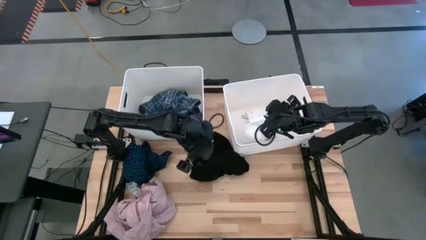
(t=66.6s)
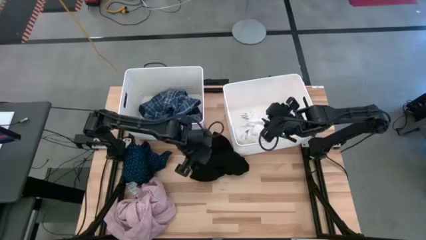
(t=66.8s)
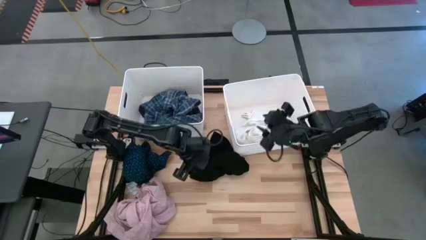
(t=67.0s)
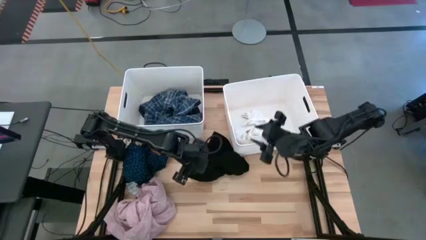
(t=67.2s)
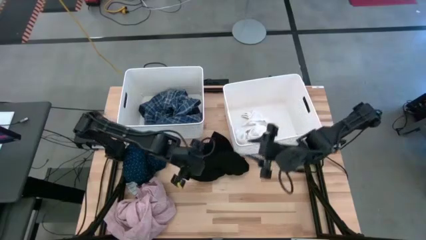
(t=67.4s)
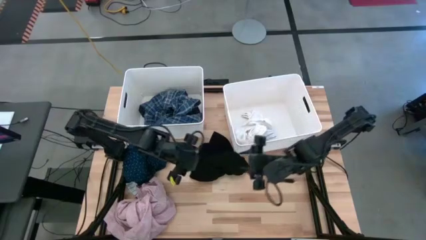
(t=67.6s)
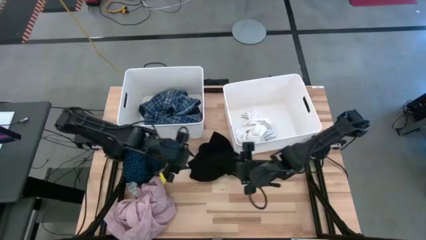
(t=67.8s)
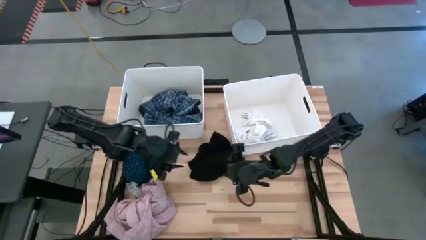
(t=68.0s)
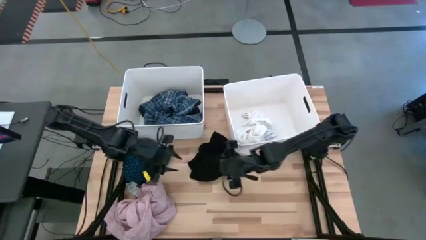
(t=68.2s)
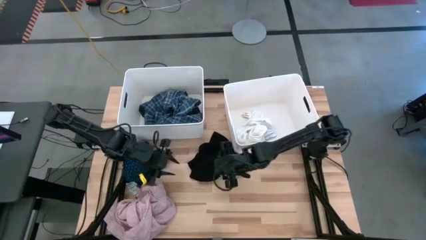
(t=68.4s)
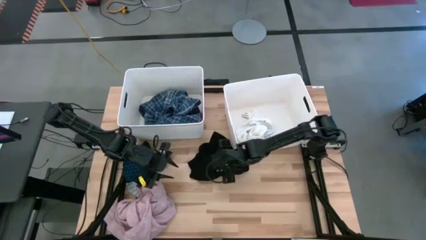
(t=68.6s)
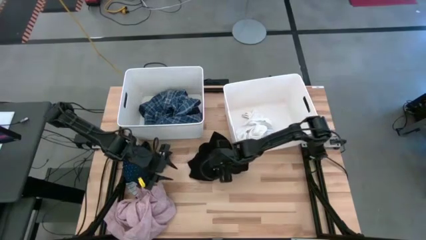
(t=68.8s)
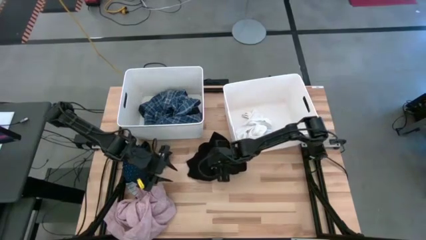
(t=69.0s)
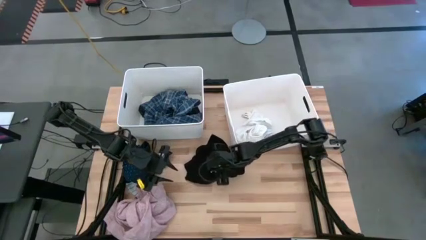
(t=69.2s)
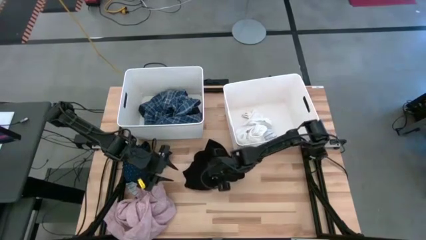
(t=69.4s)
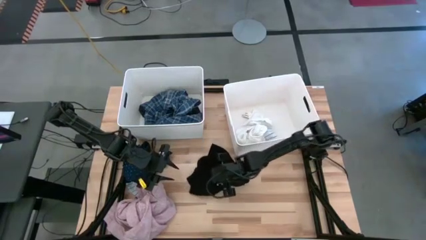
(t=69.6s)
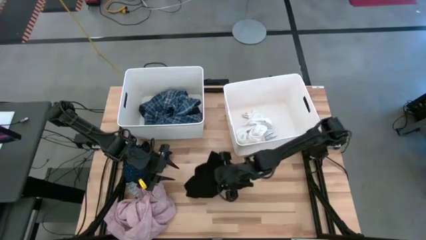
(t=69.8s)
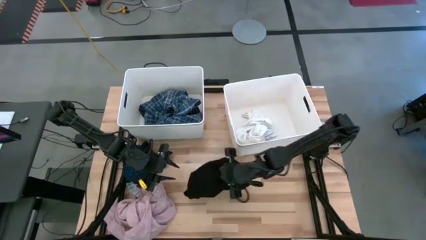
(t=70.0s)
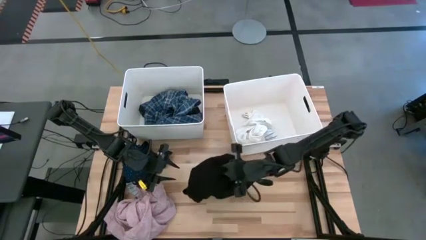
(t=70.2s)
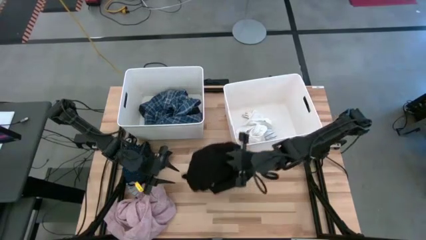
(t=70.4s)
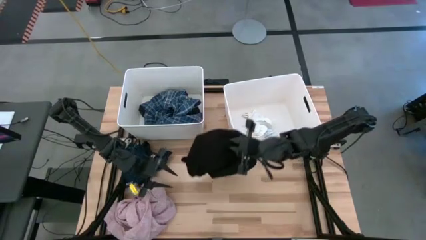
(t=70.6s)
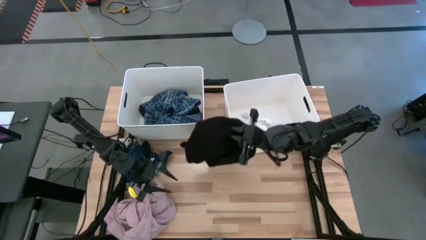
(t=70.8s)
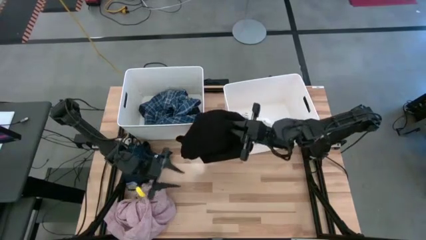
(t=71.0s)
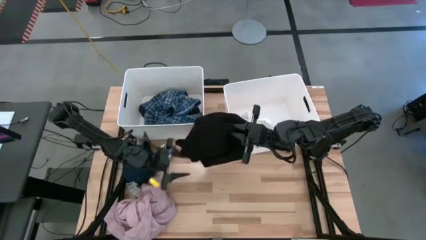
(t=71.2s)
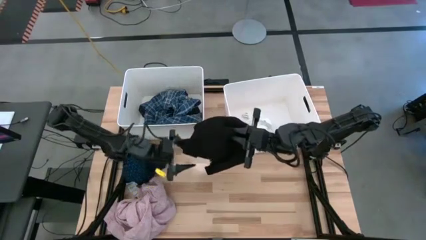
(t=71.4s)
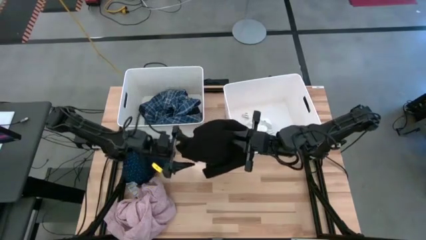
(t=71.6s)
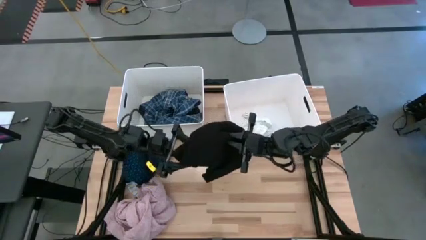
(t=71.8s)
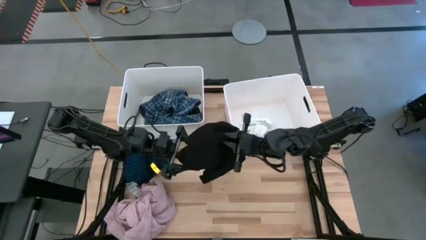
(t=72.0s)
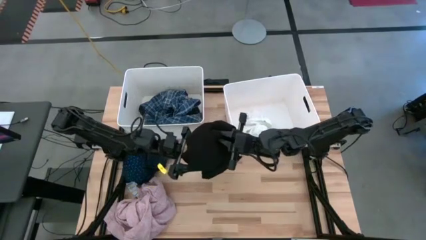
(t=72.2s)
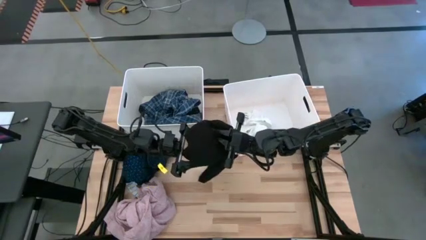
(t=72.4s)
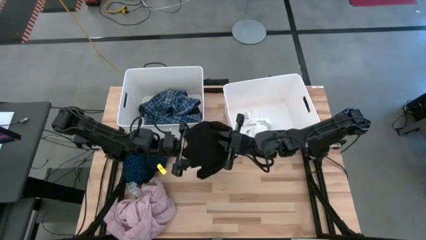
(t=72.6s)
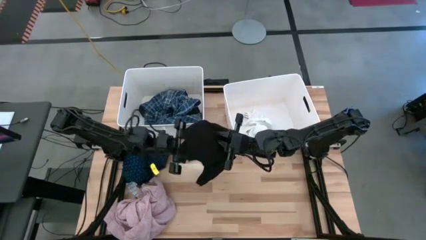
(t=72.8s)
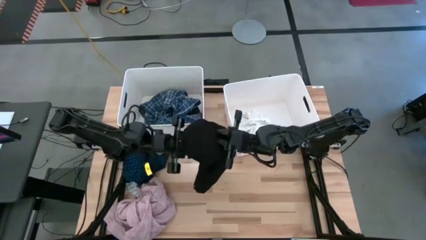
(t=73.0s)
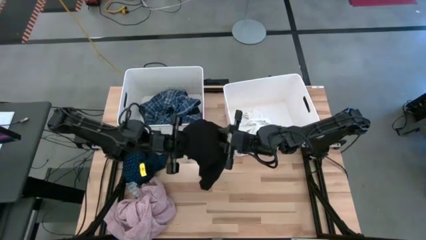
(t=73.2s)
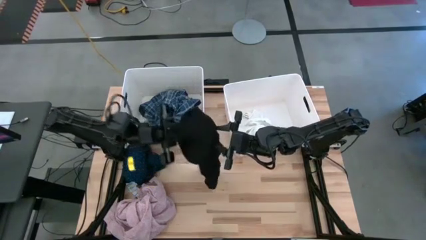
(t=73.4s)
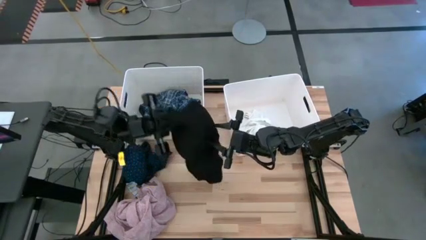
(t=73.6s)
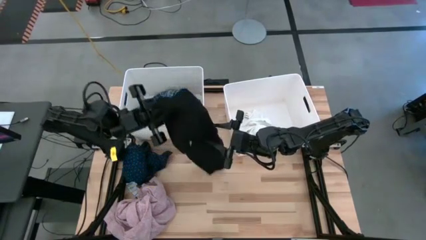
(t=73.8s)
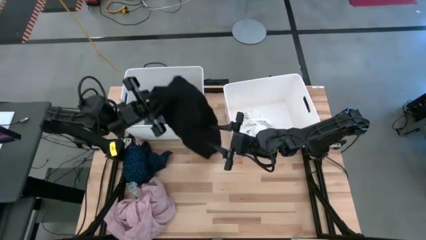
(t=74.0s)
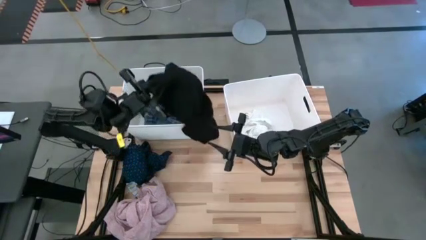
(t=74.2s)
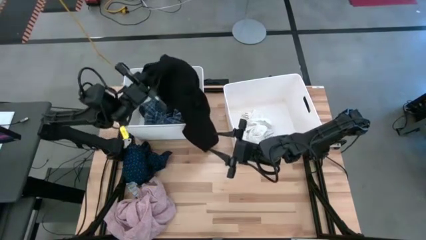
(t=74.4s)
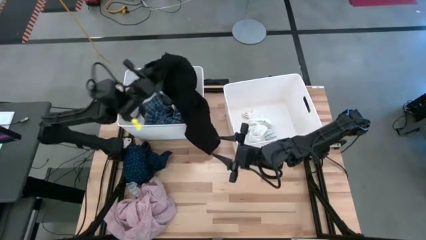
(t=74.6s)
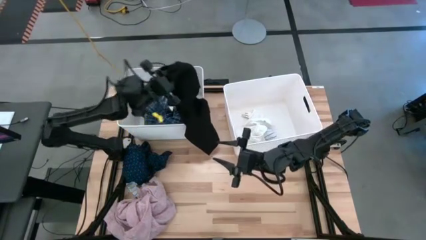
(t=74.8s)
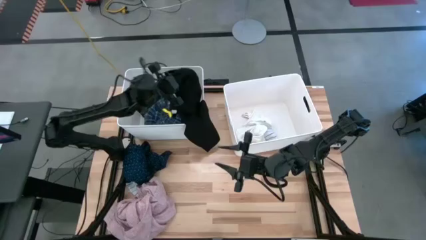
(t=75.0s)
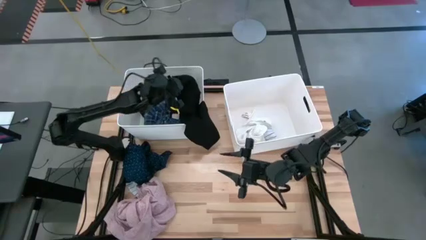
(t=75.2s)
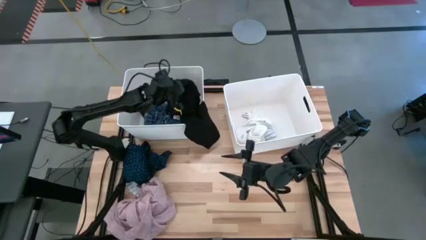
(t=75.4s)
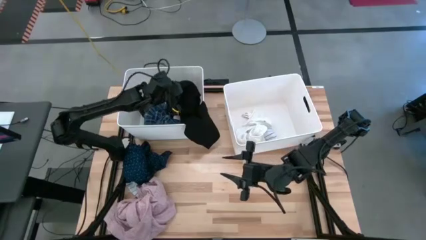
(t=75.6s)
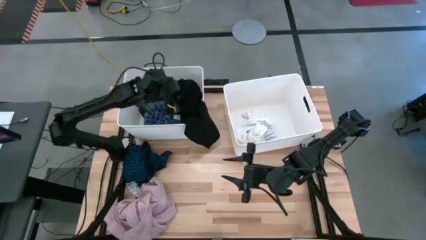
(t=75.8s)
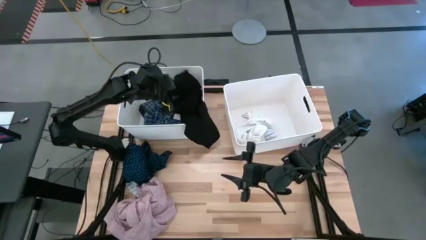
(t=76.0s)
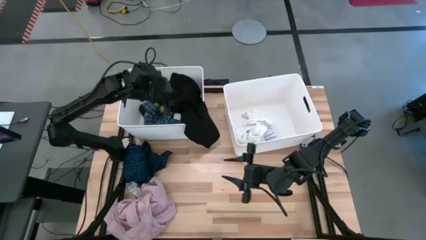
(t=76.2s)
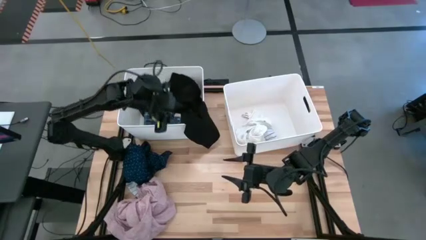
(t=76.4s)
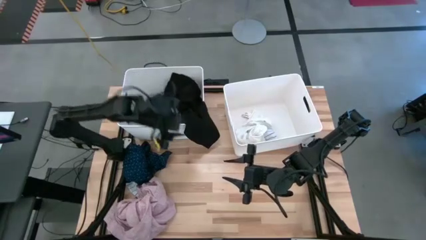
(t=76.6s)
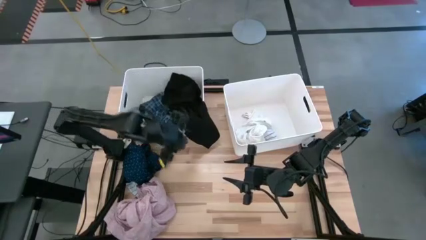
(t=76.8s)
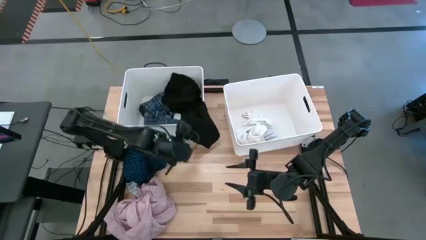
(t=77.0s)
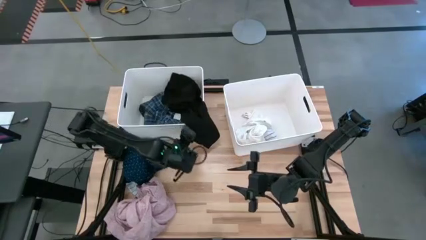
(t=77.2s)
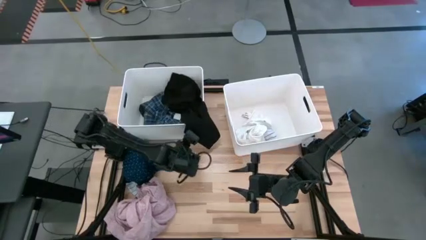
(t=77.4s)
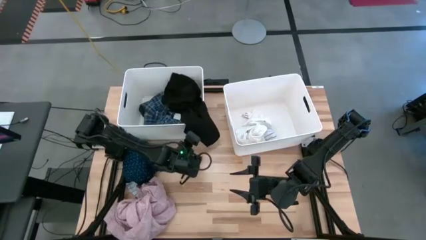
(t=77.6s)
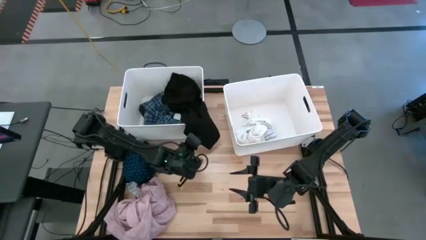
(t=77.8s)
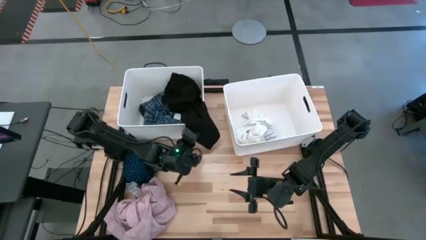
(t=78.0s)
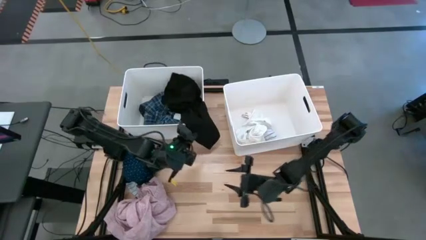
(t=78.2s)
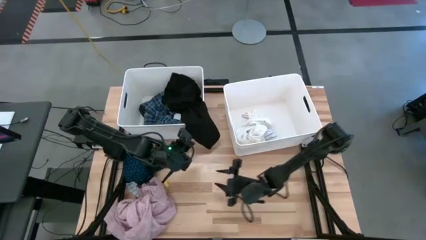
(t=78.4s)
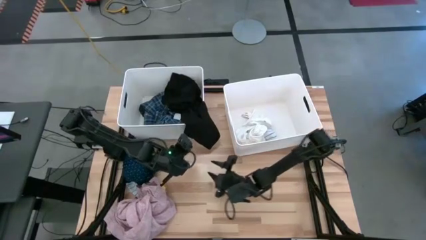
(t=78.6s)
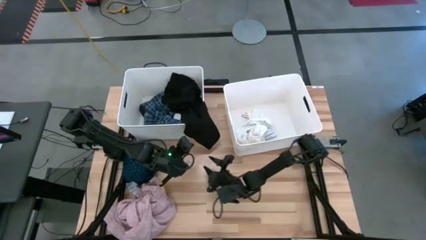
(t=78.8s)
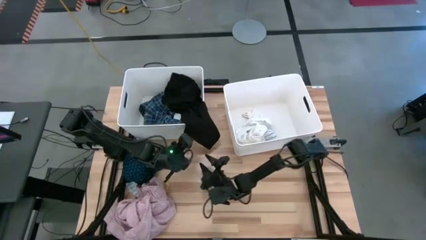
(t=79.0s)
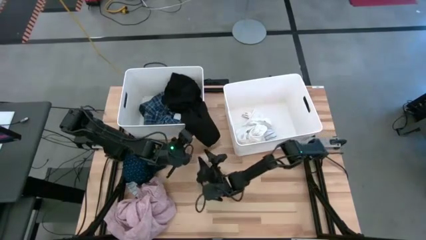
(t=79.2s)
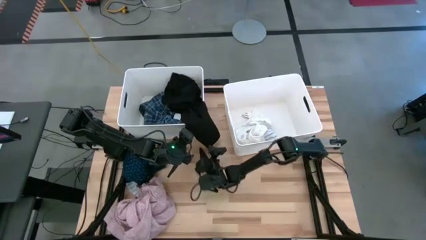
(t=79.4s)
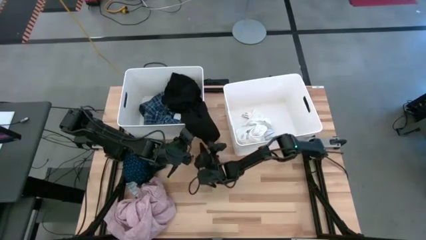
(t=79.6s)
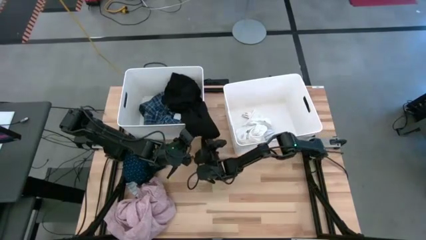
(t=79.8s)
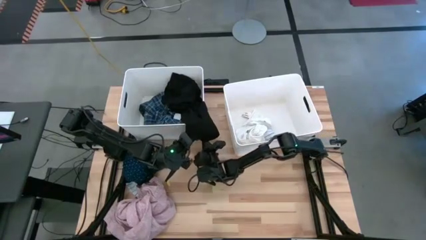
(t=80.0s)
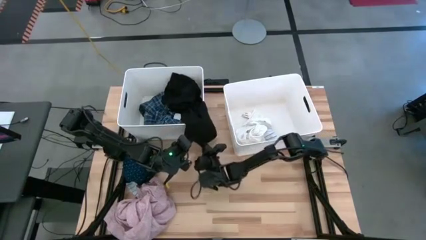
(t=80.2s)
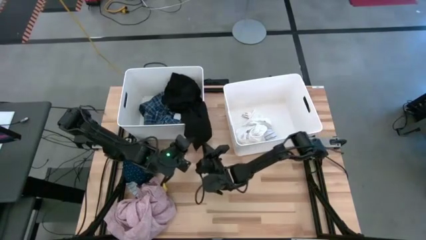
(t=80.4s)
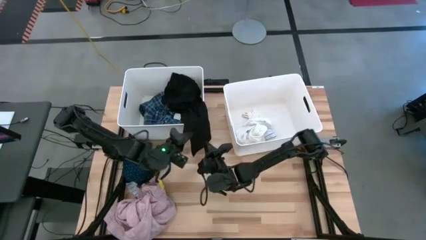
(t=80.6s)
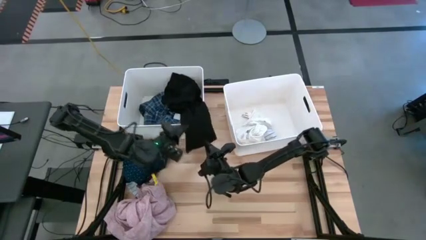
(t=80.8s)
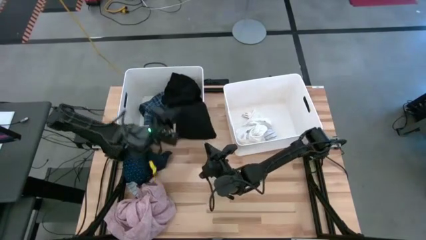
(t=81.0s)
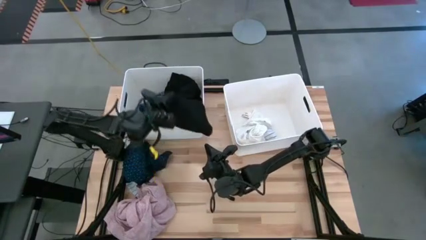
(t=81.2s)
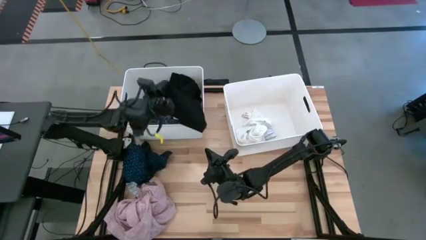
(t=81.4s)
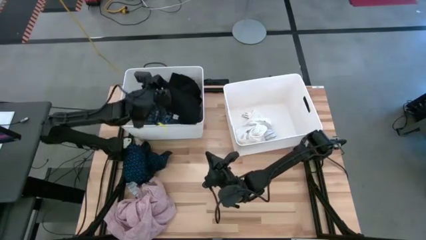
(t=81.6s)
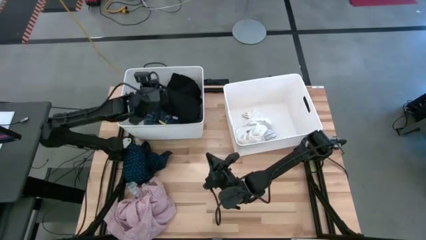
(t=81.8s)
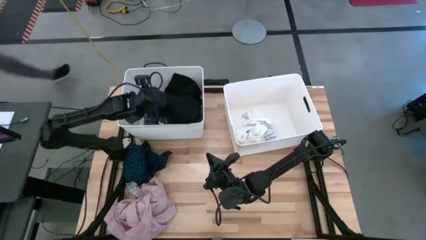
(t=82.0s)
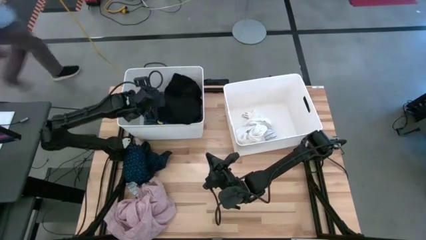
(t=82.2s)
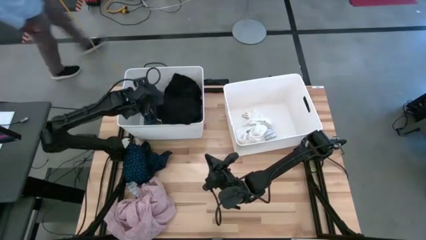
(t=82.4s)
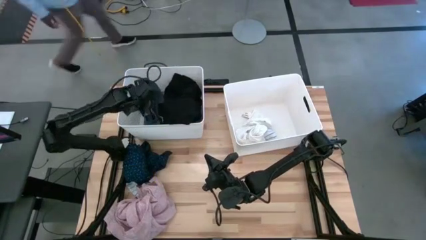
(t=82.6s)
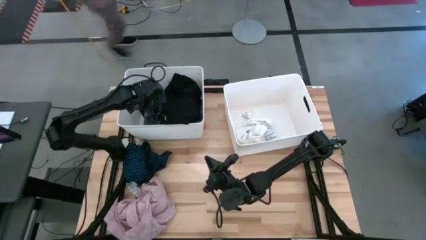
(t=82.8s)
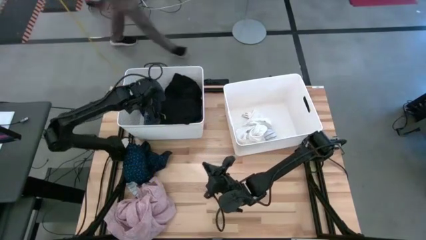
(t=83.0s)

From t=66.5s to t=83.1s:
Task: Sort clothes
Put the black shirt into the left laundry bin
